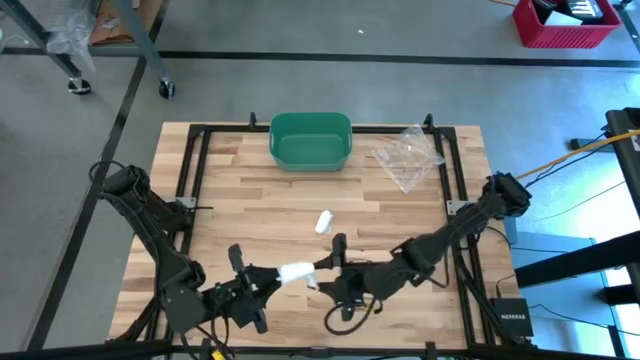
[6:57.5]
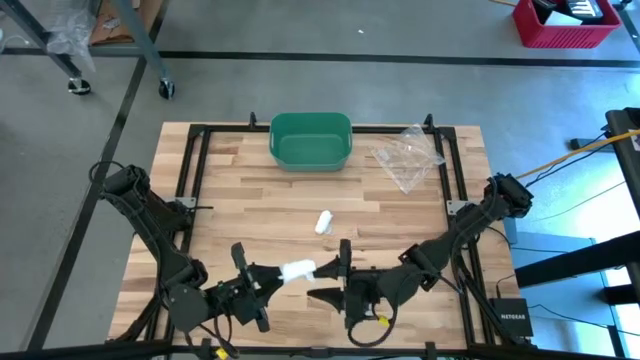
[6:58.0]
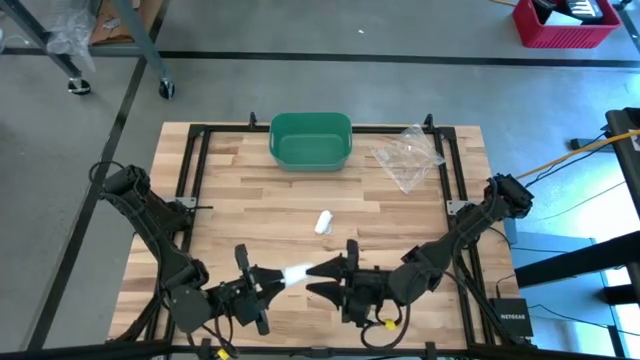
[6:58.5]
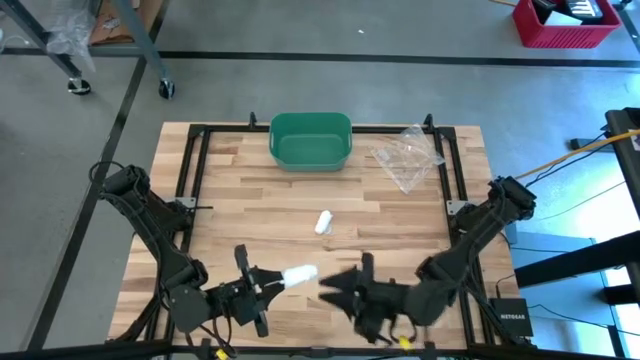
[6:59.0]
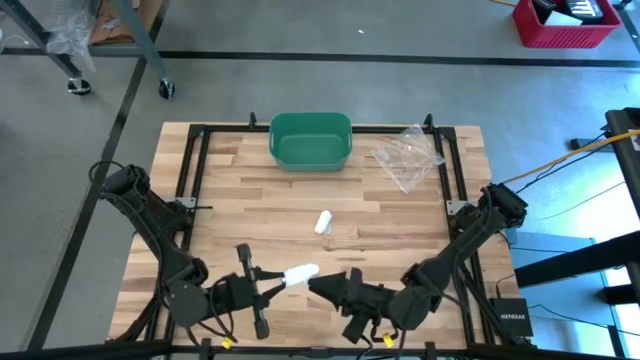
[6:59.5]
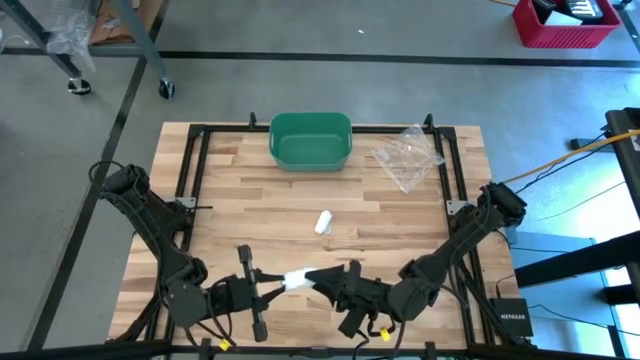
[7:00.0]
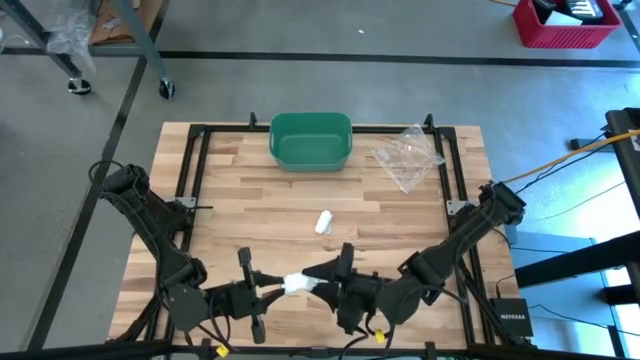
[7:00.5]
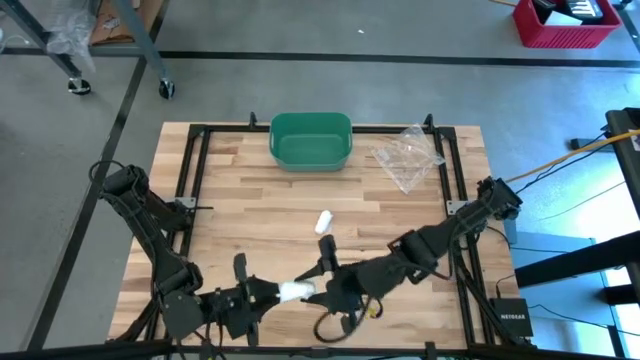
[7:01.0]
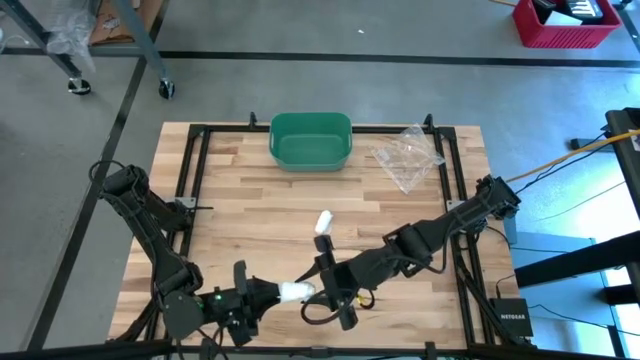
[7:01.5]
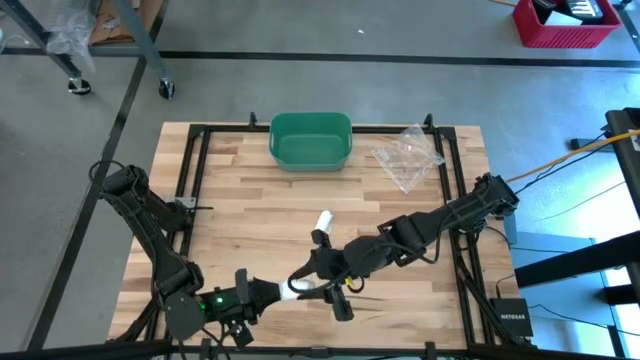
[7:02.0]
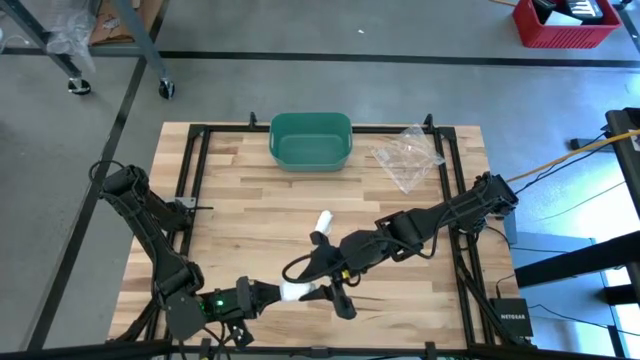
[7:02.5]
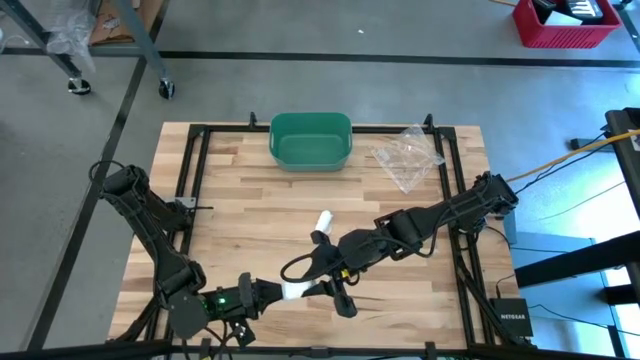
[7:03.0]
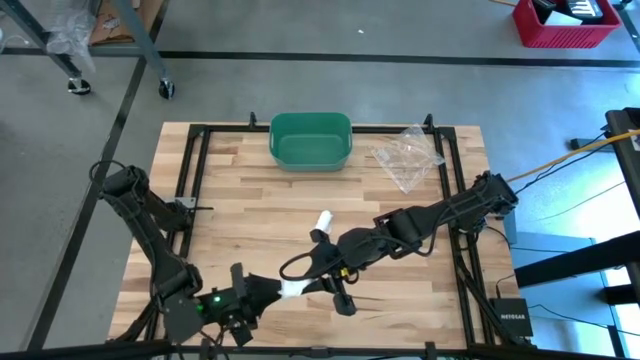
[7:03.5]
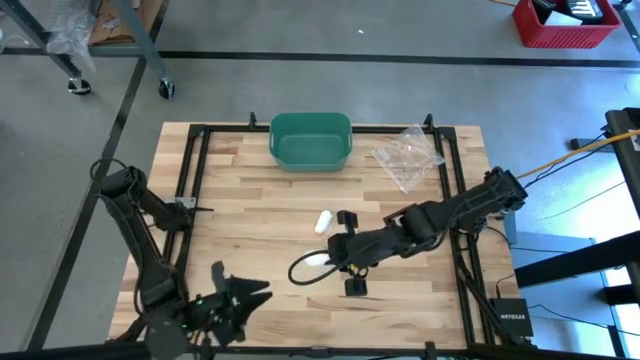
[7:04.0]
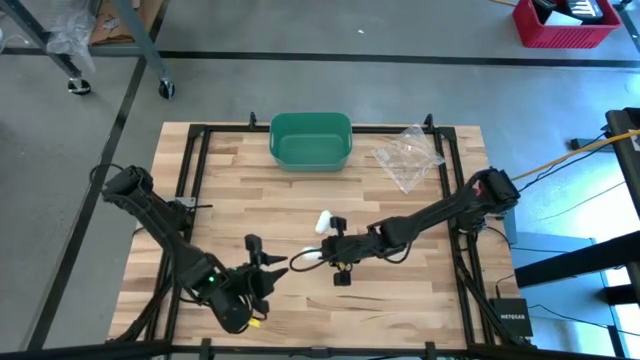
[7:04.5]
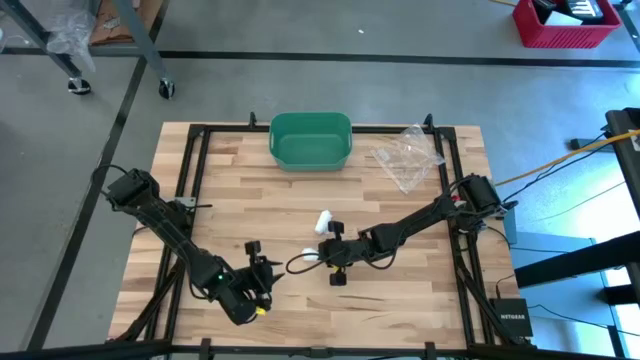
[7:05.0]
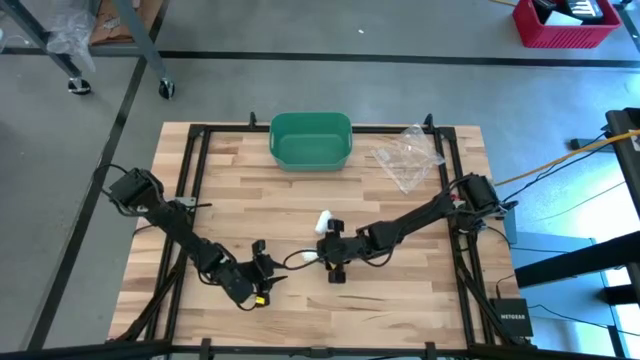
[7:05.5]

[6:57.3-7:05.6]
Task: Roll bandage
Roll the bottom white bandage

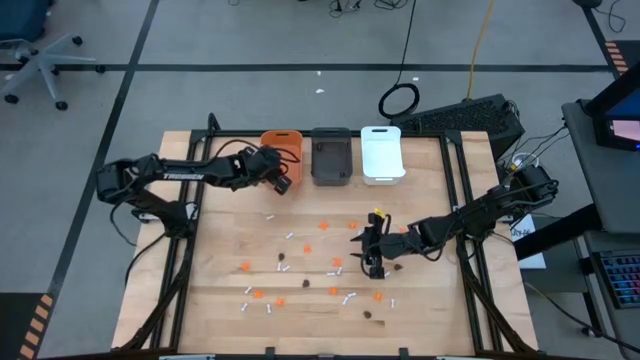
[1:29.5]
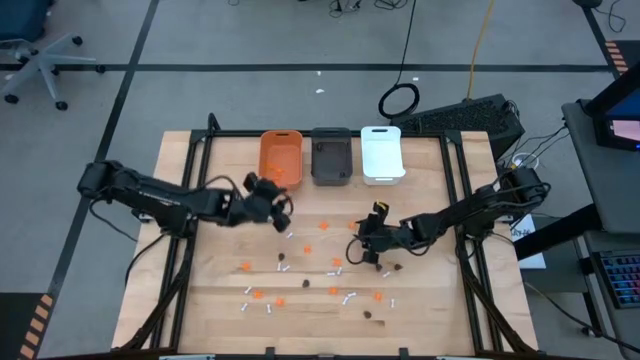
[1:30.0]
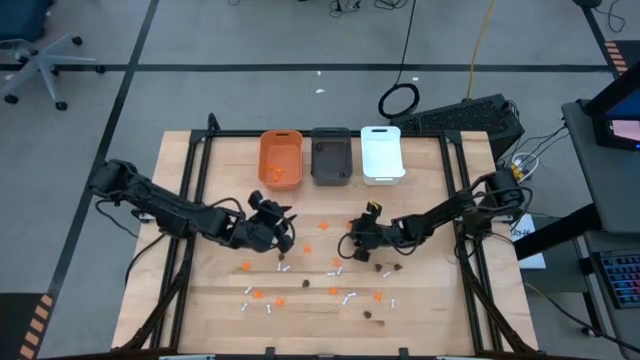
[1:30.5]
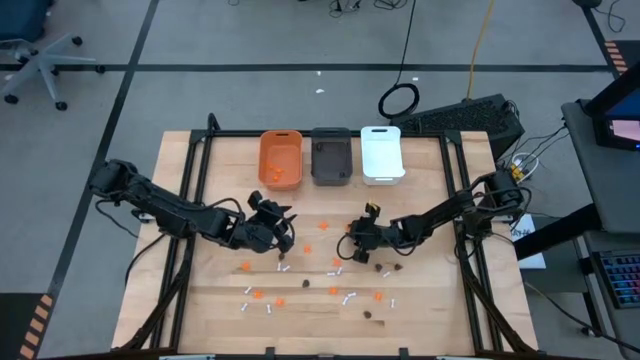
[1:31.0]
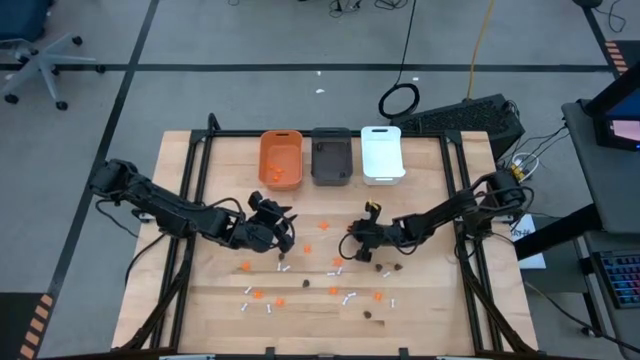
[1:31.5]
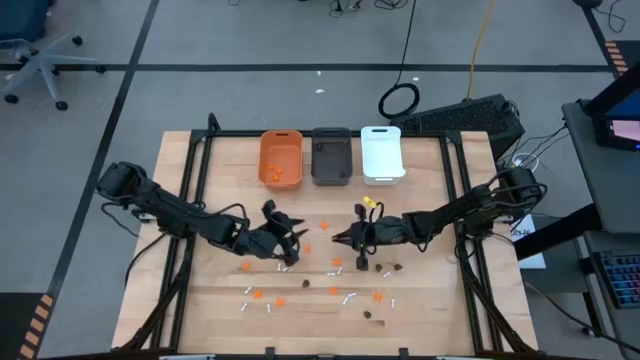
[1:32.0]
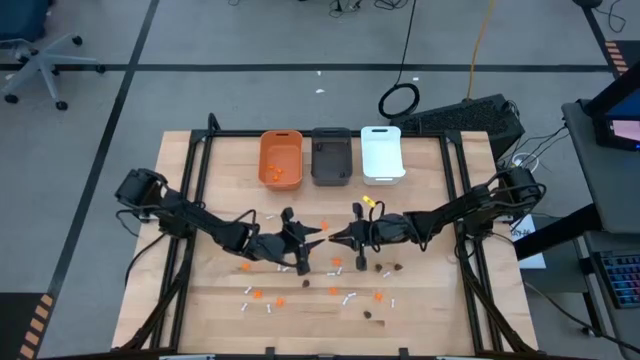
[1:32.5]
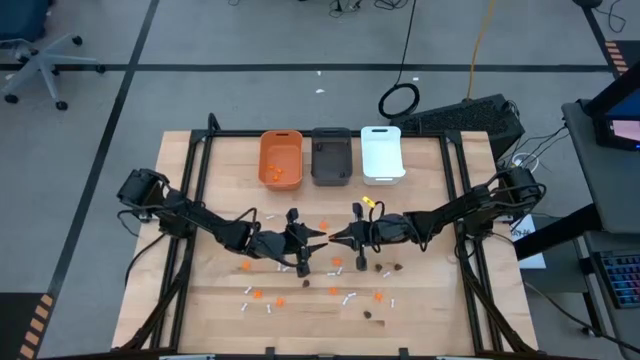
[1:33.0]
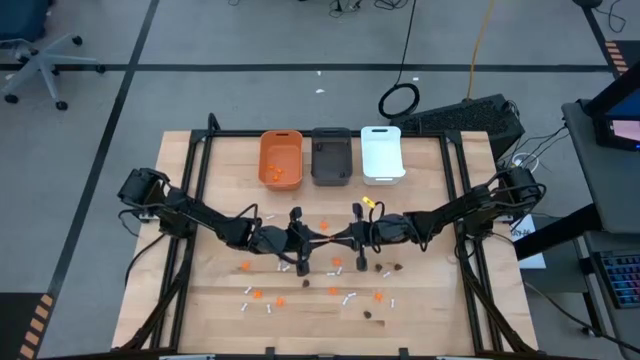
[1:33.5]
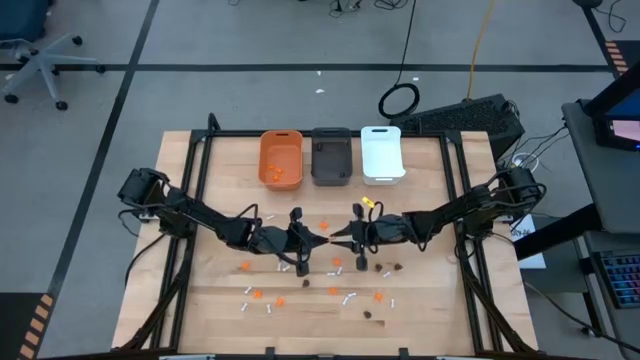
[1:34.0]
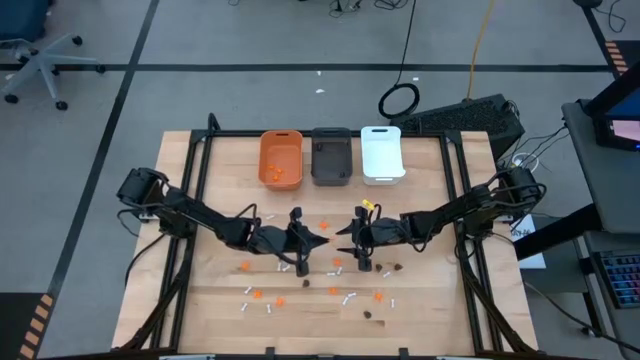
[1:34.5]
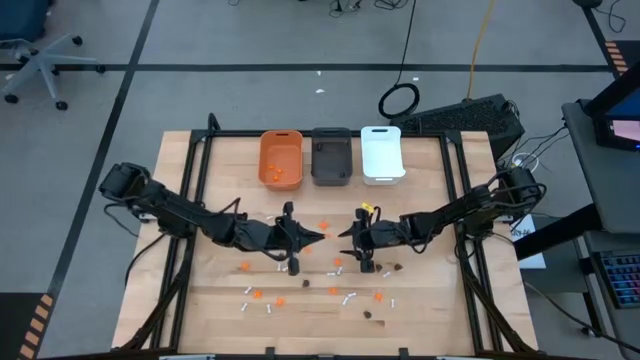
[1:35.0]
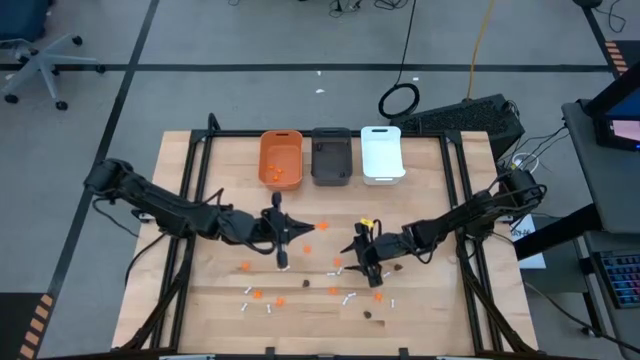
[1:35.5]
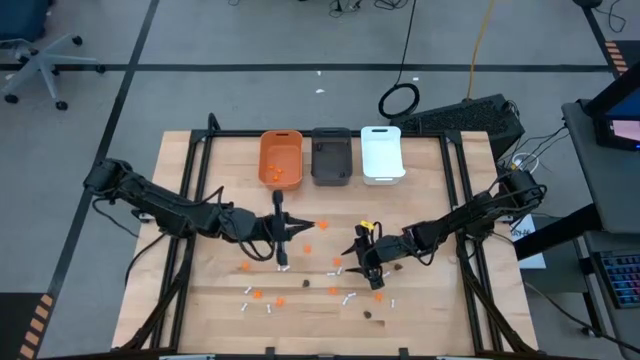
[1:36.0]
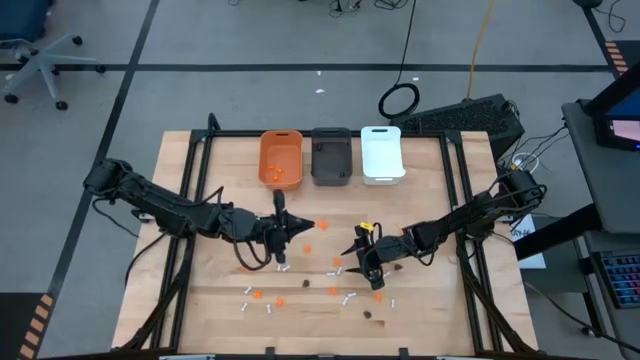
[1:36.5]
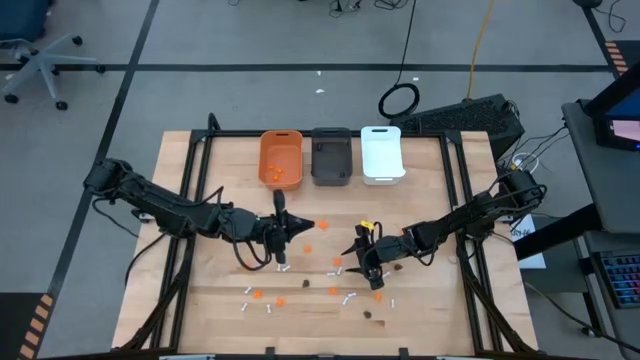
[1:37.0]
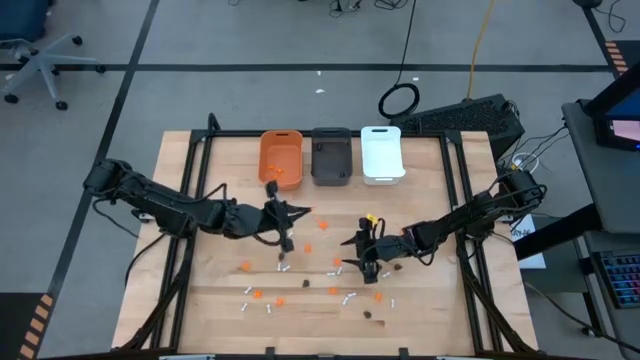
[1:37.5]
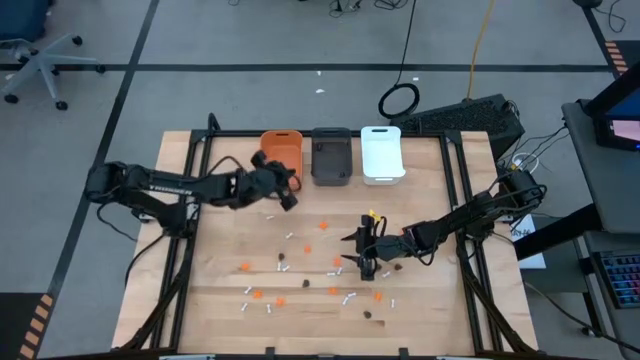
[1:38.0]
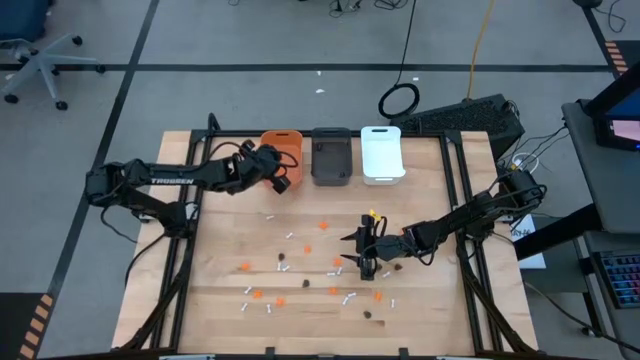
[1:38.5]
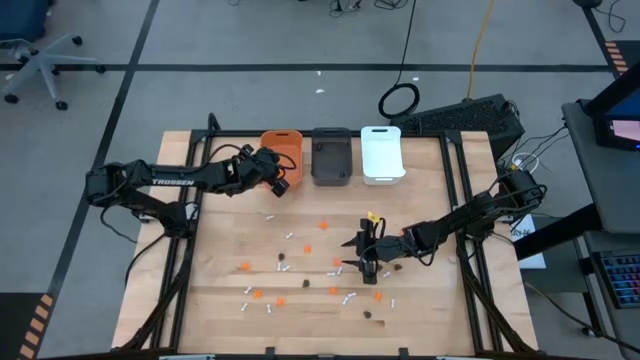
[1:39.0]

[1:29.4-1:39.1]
Task: Sort Halloween decoration
Put the orange spider toy into the orange bin
